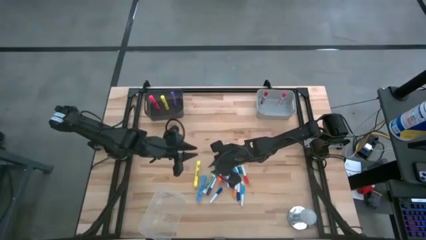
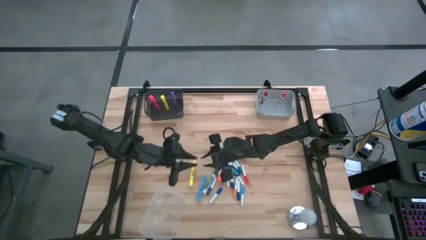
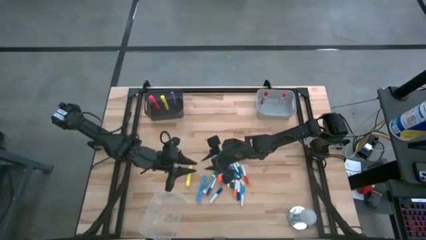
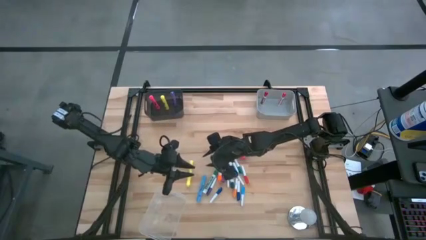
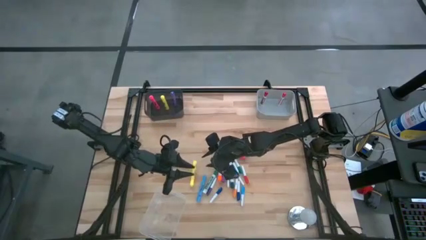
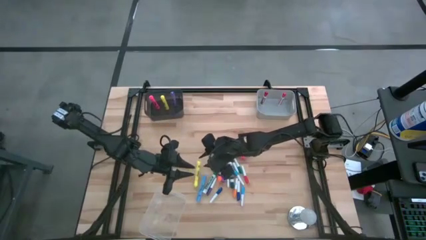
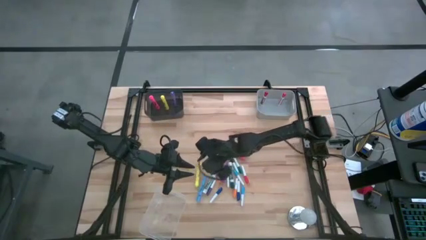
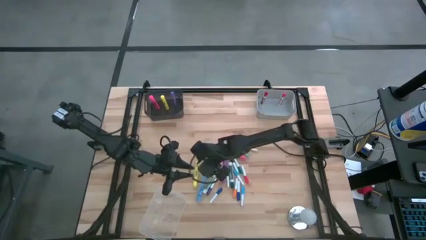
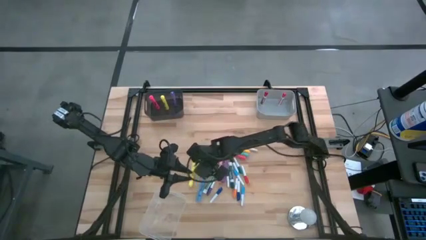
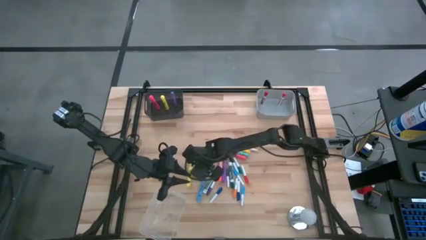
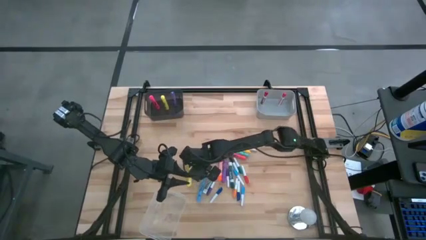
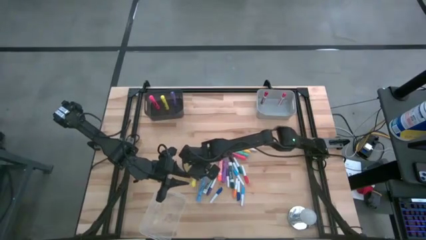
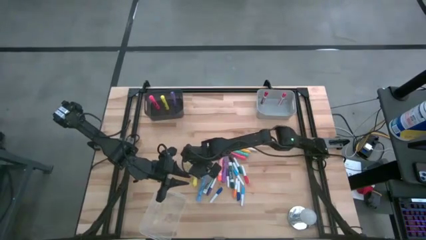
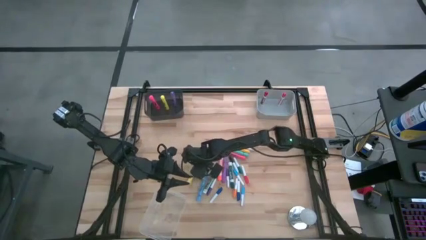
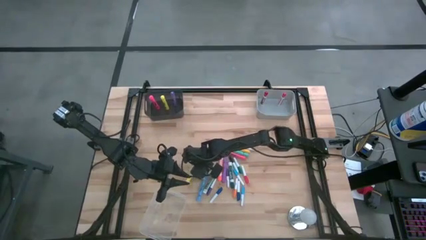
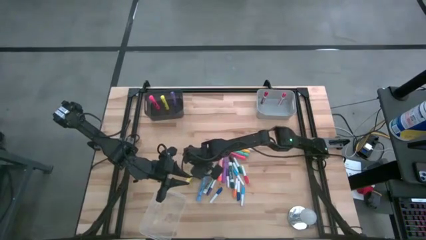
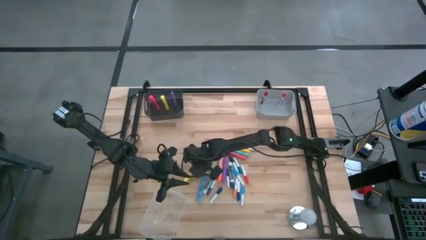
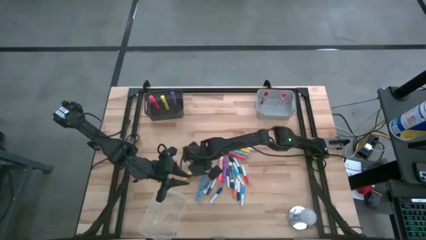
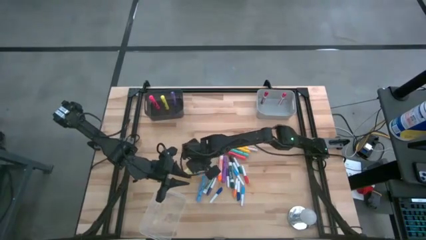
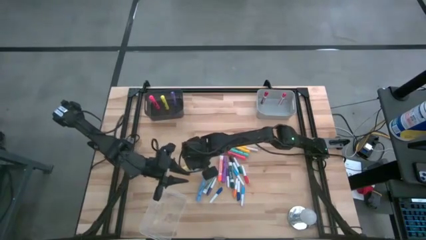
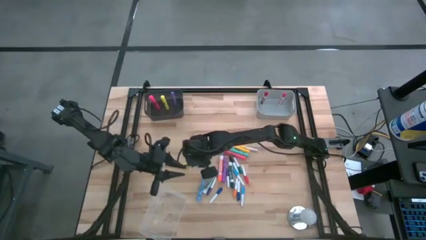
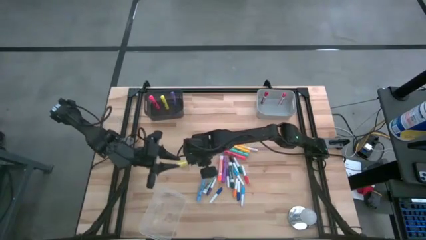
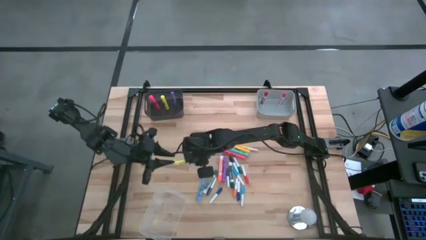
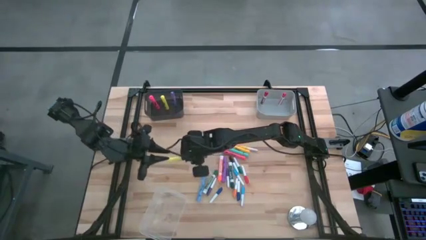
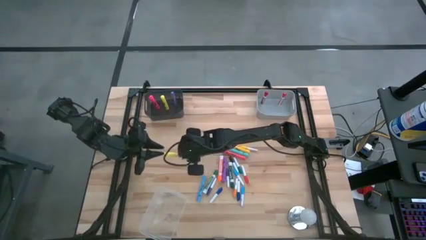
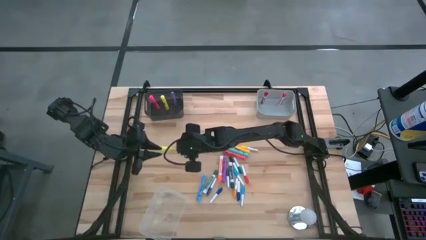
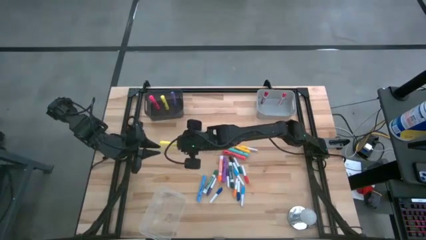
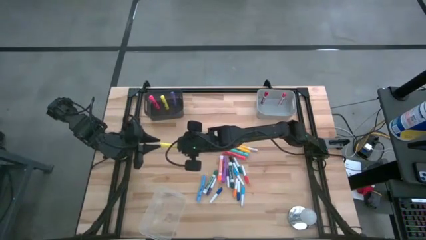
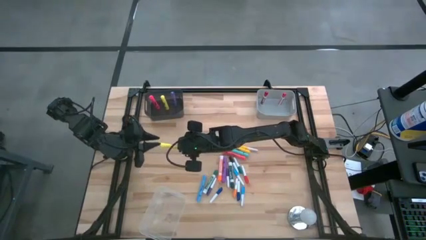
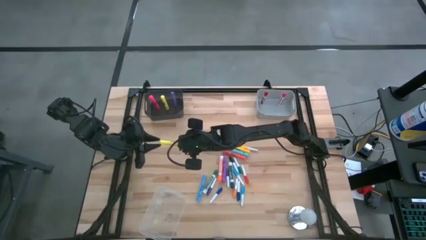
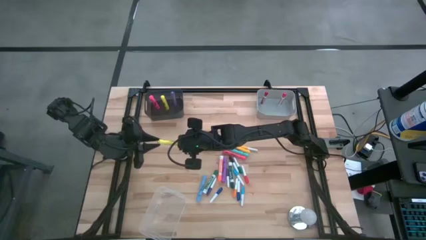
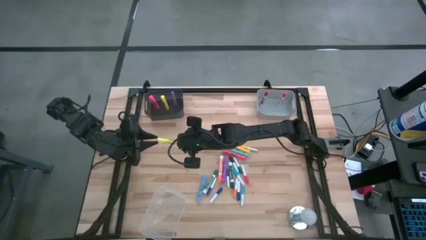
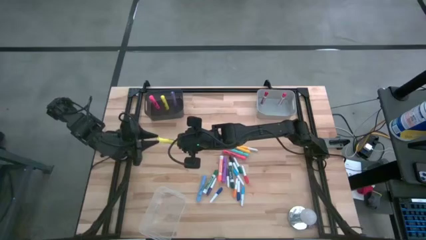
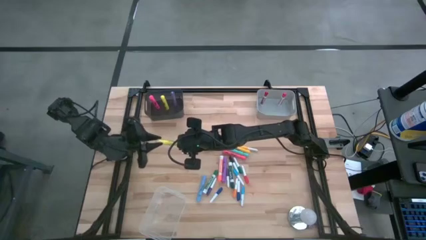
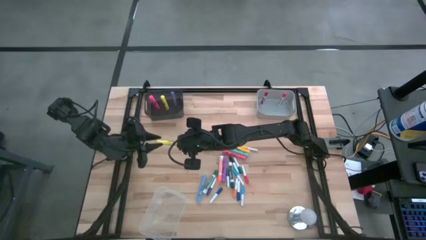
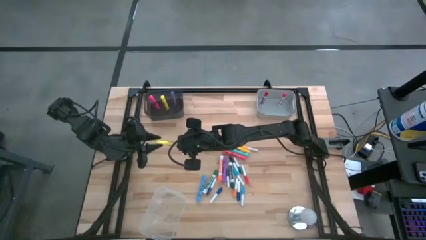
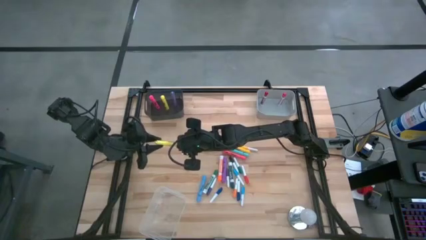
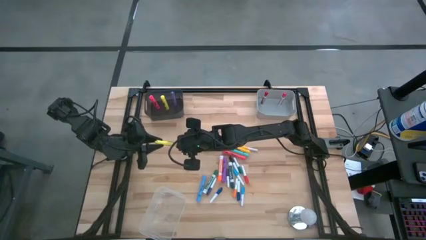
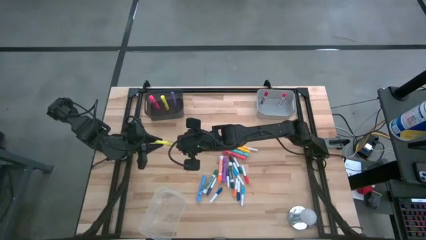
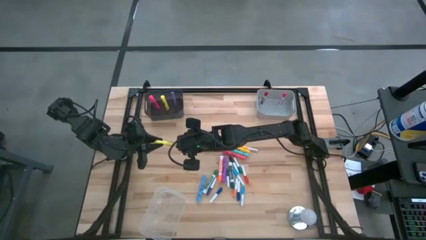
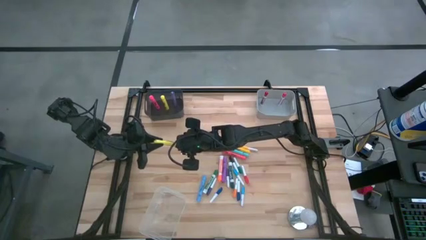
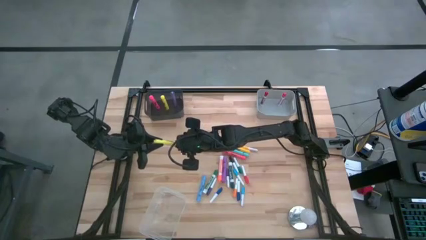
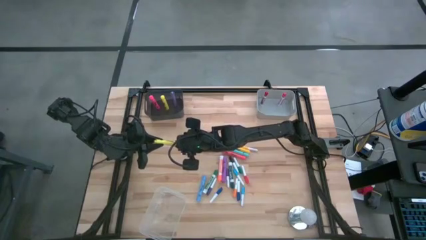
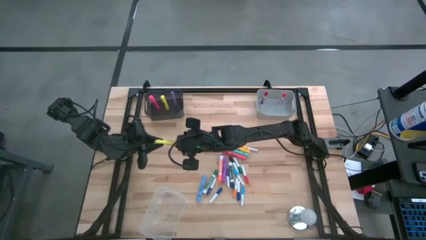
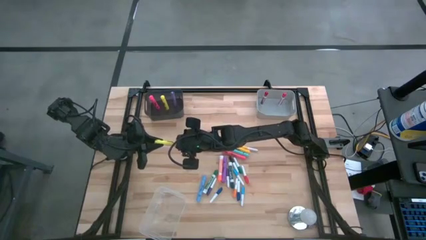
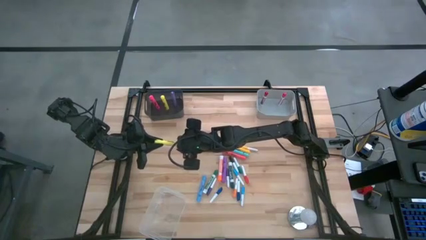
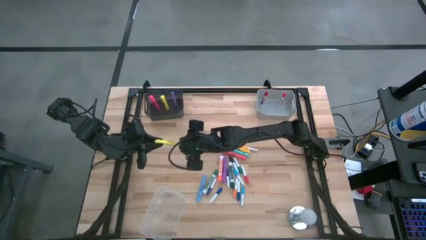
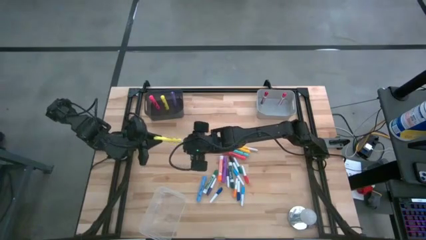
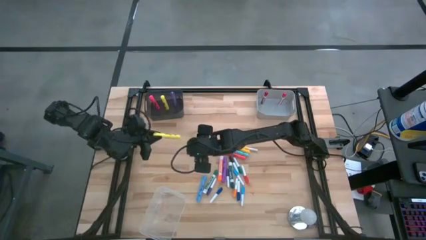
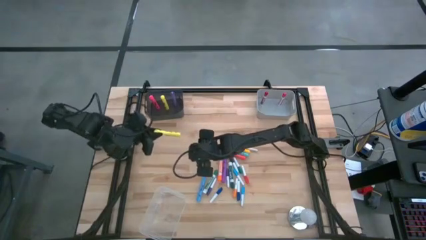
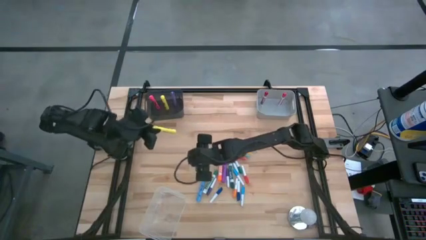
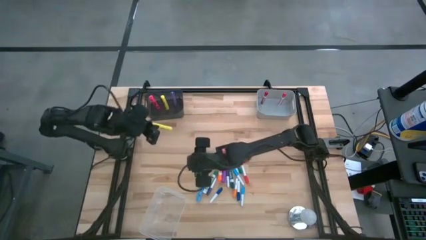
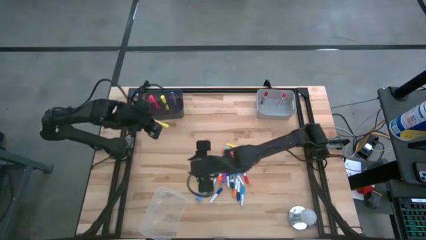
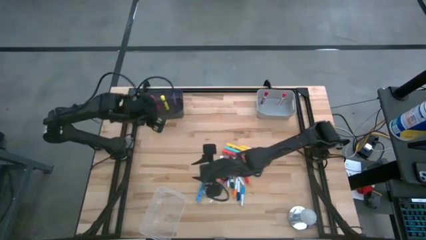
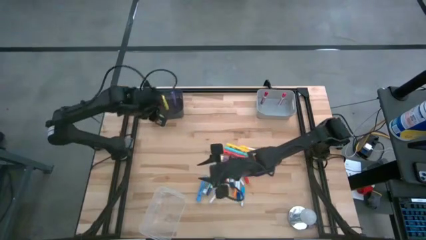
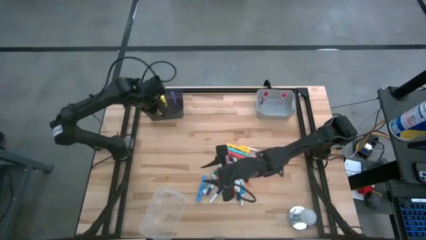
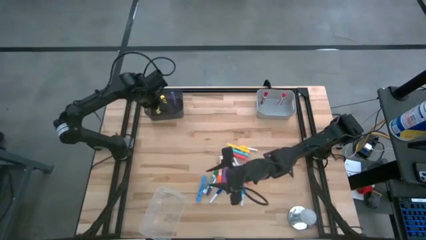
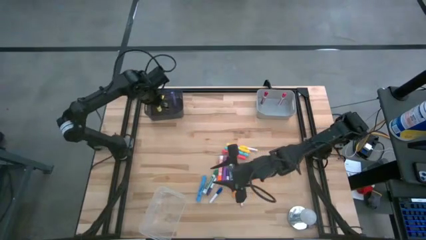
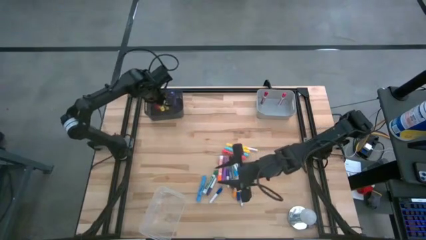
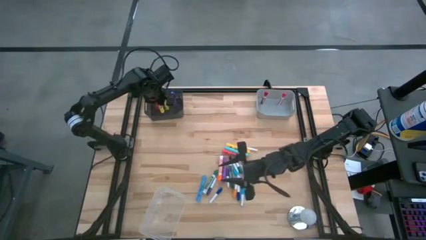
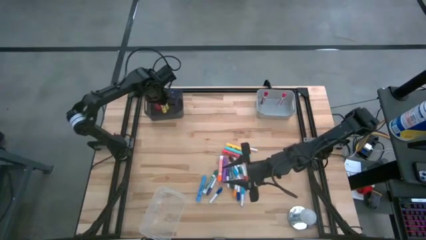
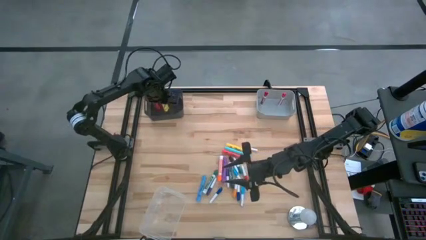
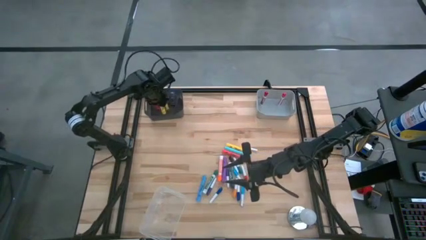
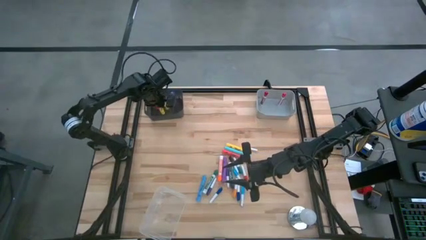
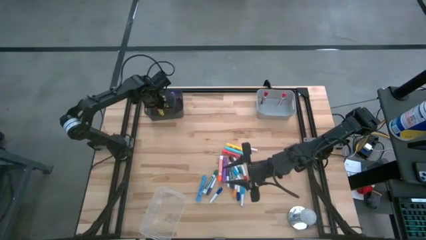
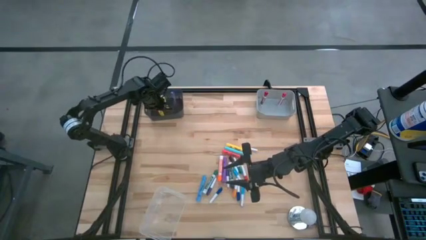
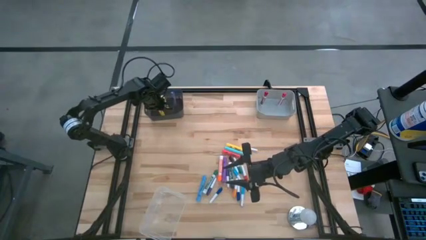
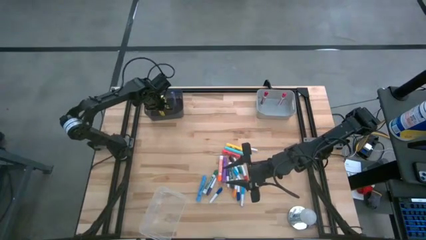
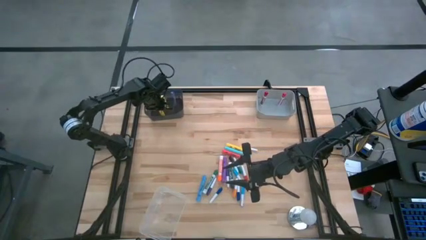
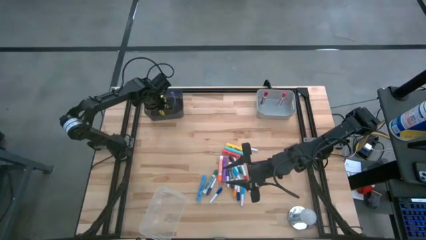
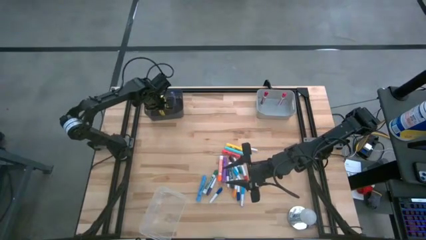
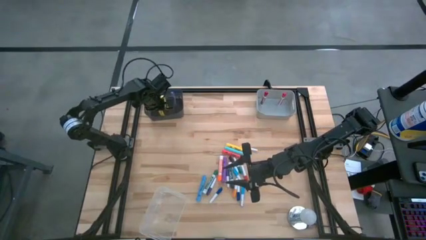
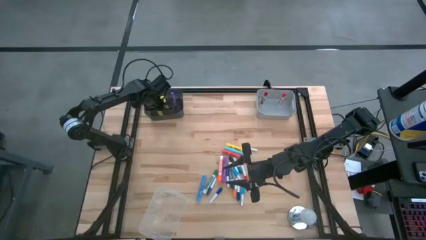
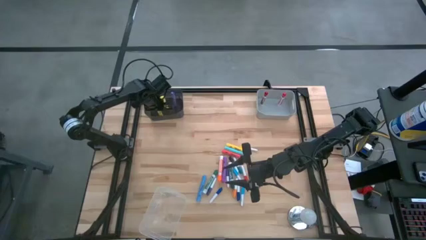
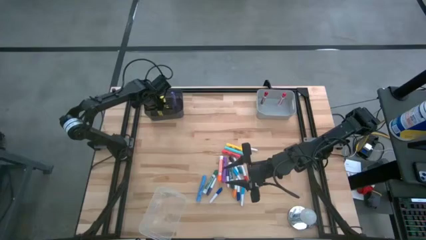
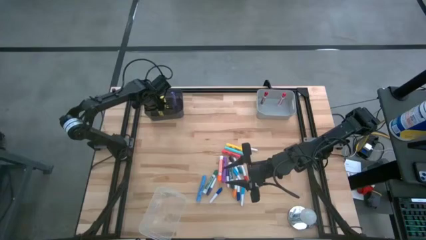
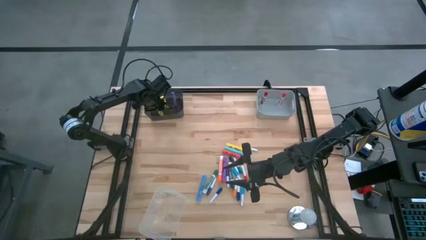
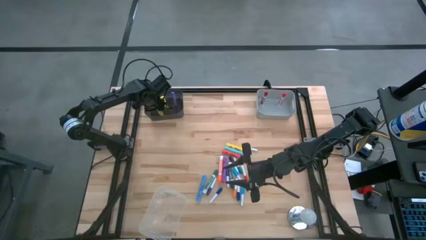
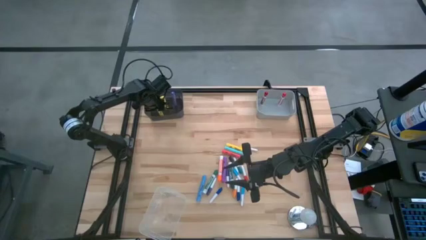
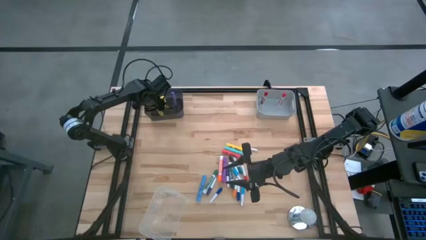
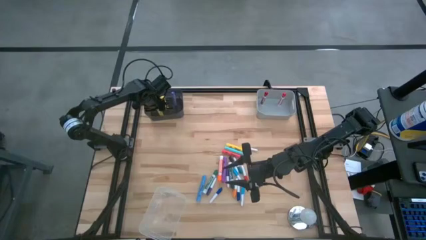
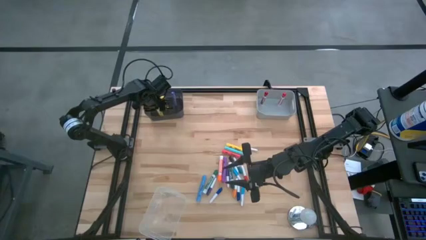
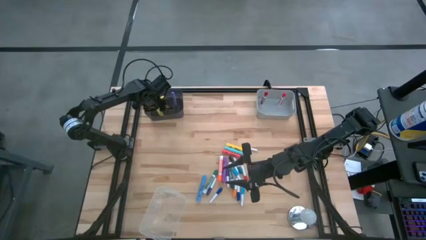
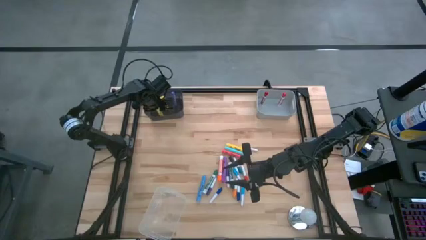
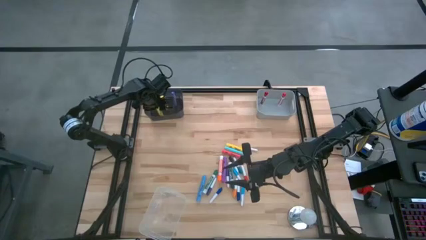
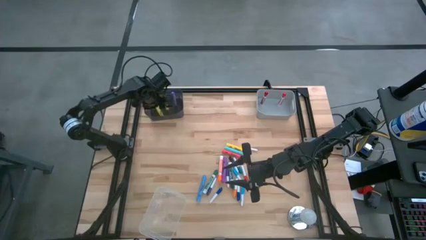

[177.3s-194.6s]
Task: Pick & Place Markers
Put the yellow highlighter pen into the black bin
